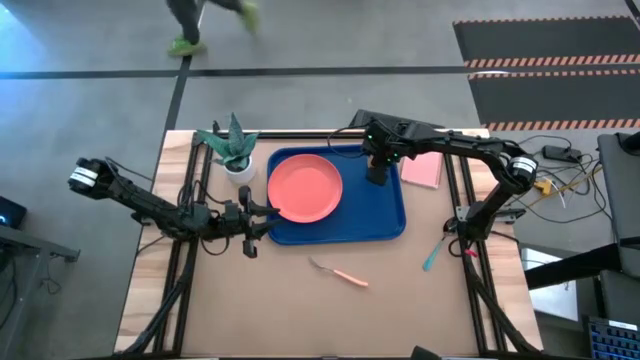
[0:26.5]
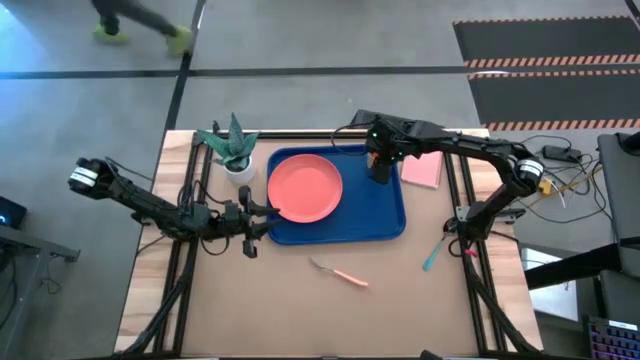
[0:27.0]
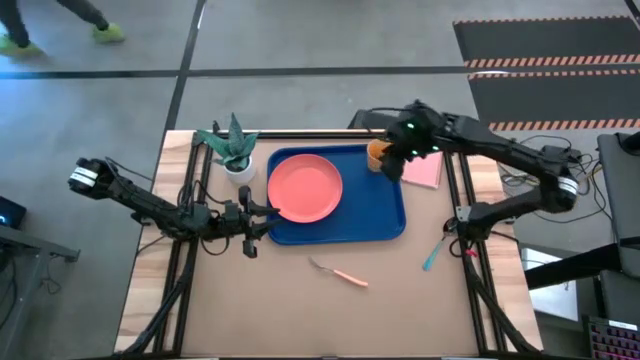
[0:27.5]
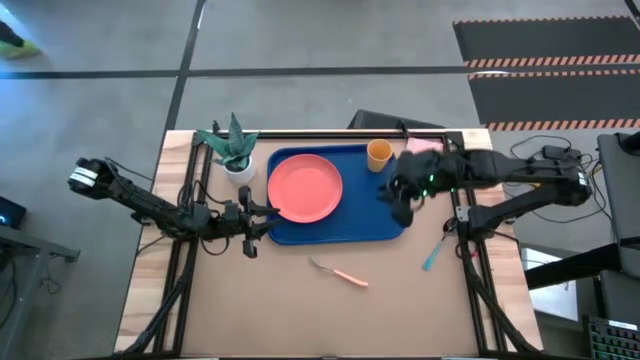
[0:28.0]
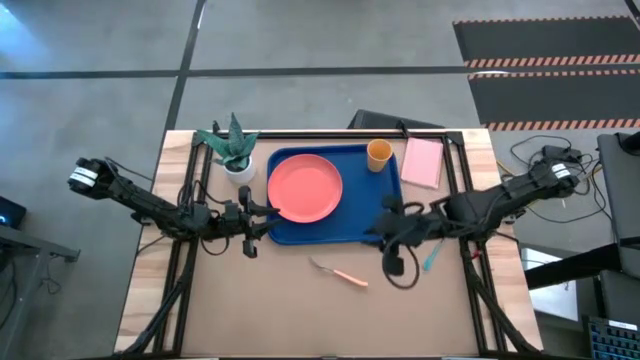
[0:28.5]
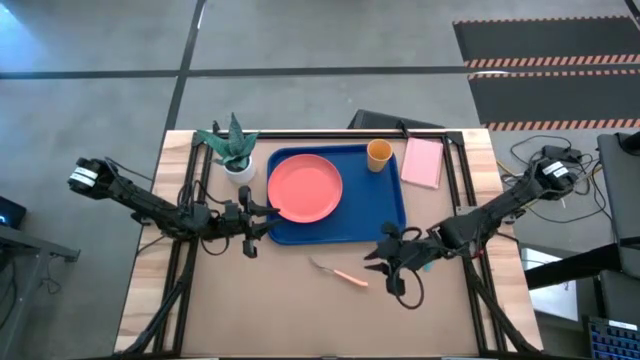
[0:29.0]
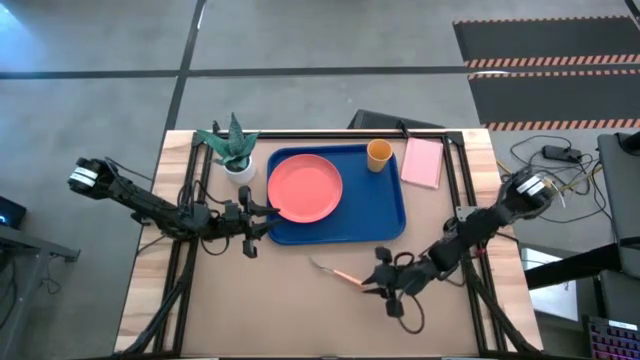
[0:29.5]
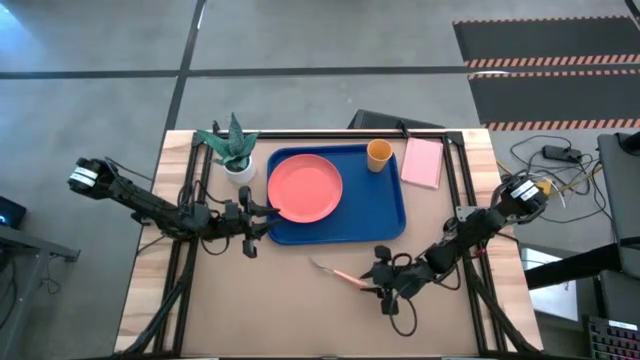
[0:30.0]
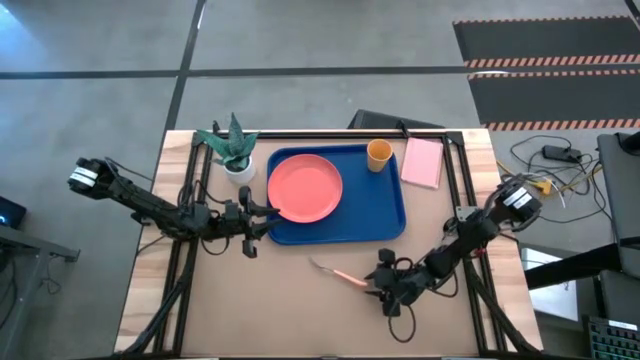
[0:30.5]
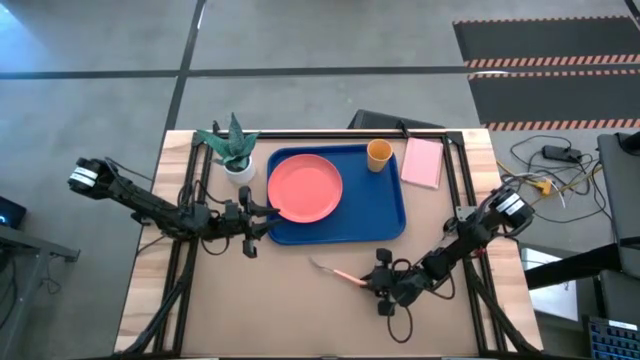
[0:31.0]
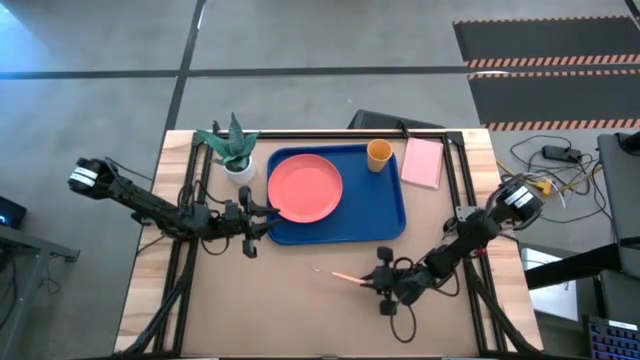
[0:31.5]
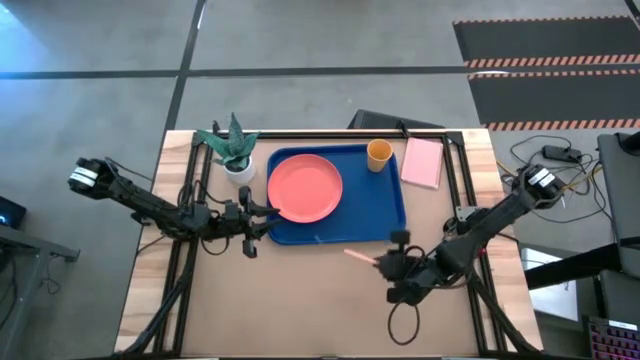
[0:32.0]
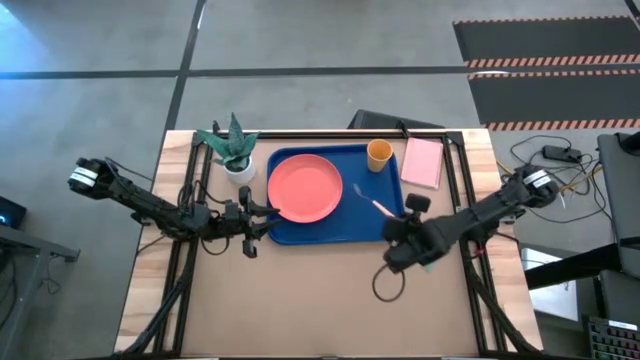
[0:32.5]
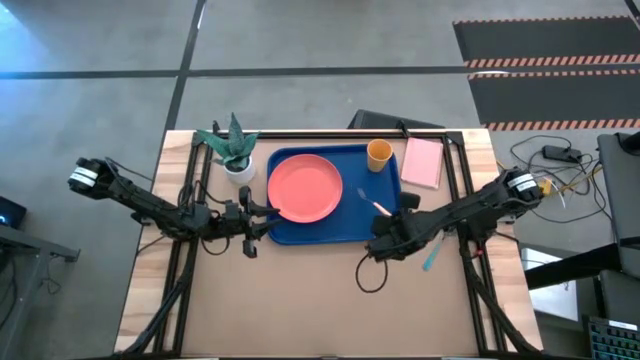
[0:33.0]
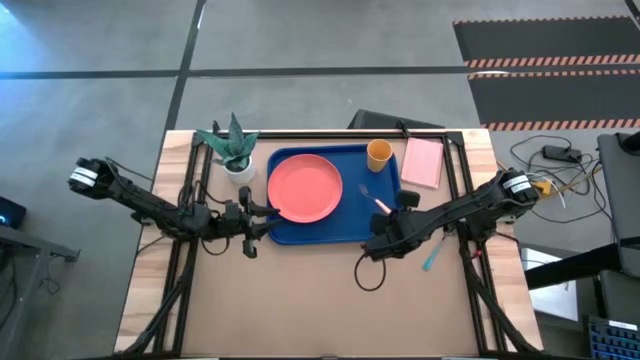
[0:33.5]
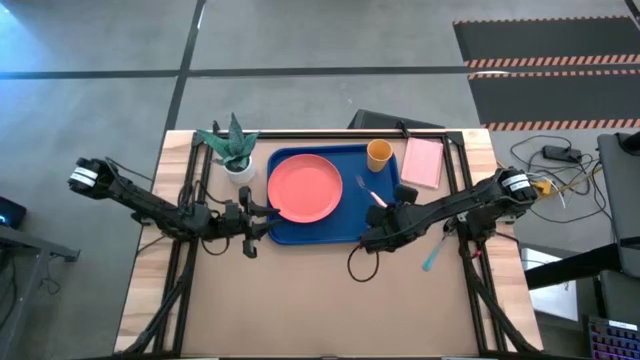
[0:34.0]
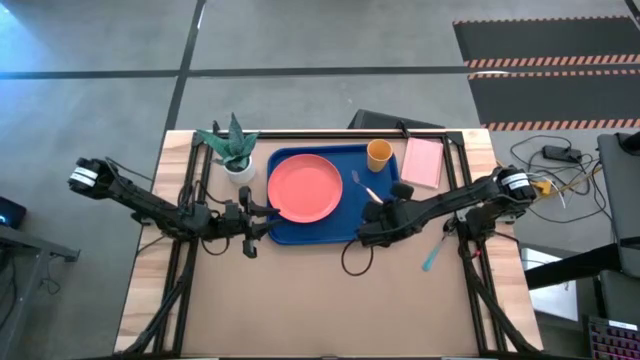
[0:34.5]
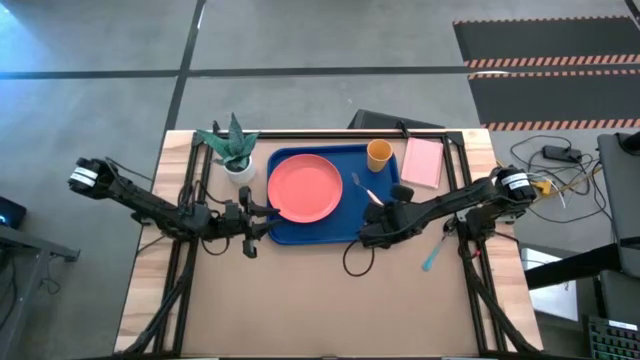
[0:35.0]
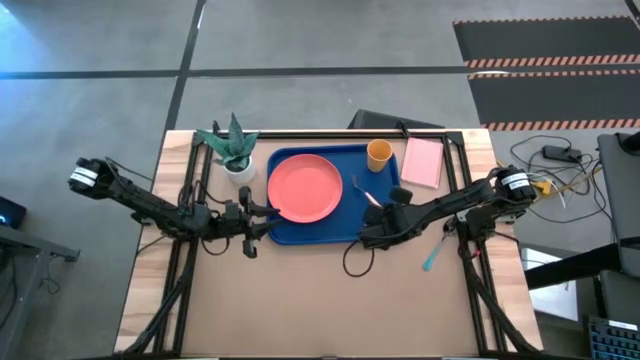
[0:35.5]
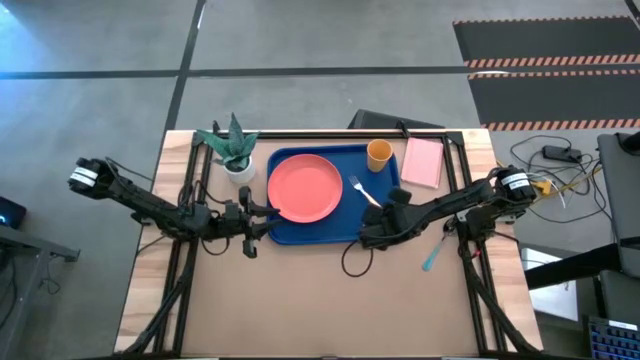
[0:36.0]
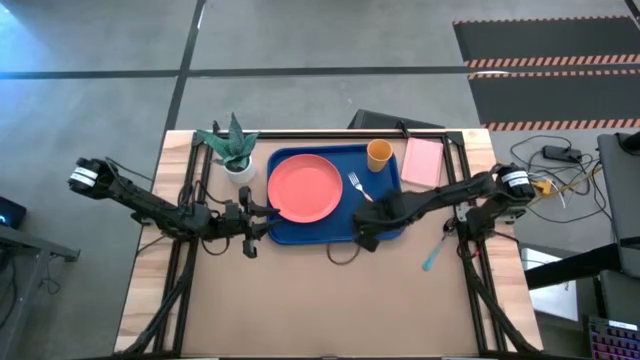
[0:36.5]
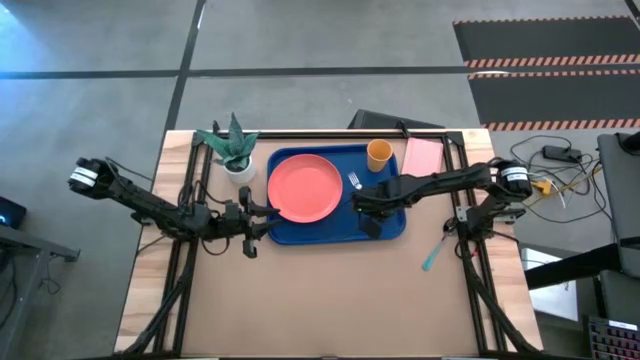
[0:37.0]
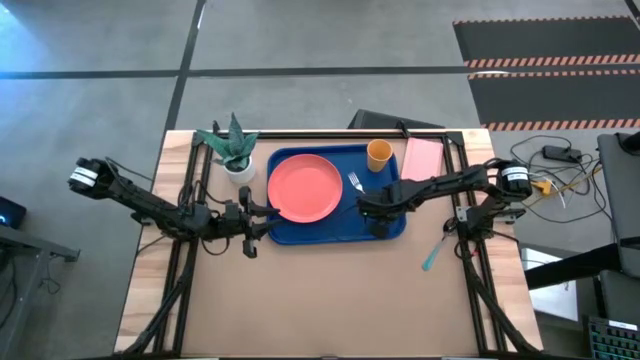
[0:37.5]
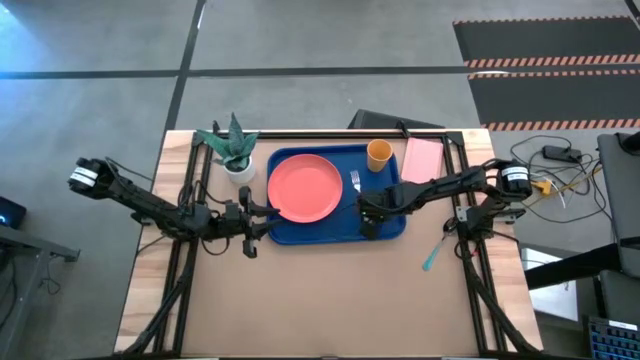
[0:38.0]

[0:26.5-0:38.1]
Task: Pick and place plate/cup/fork/spoon on tray
Put the yellow fork on the blue tray on the right of the orange plate

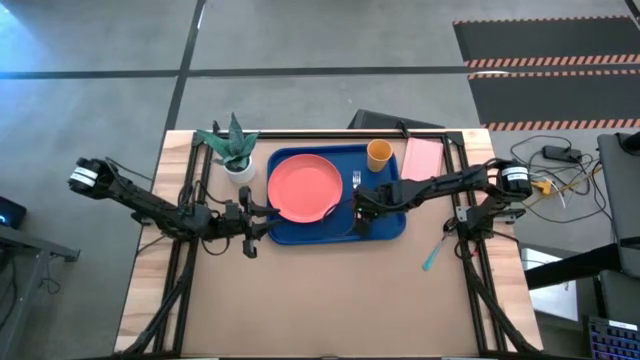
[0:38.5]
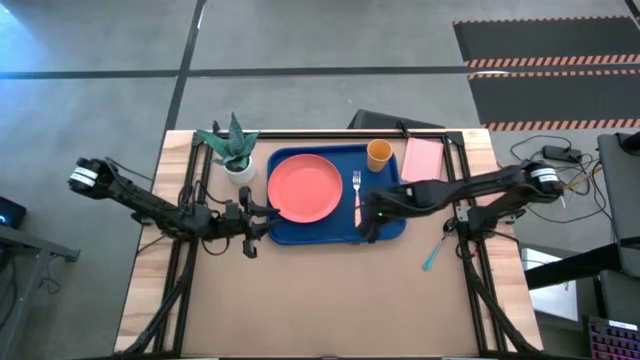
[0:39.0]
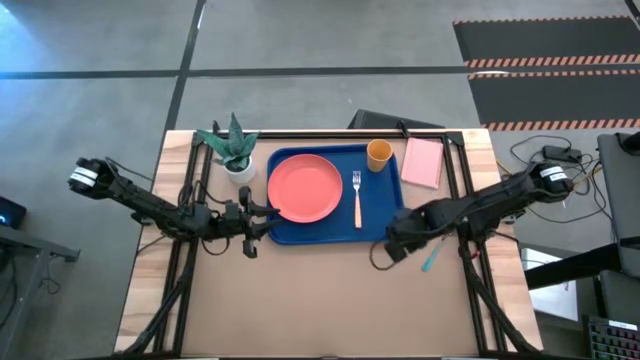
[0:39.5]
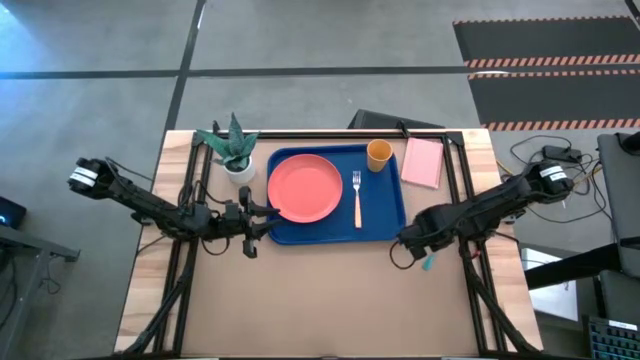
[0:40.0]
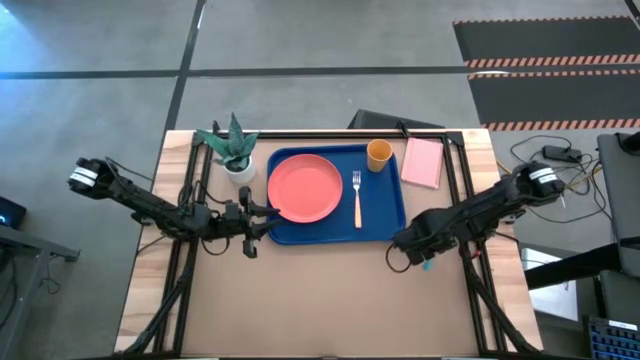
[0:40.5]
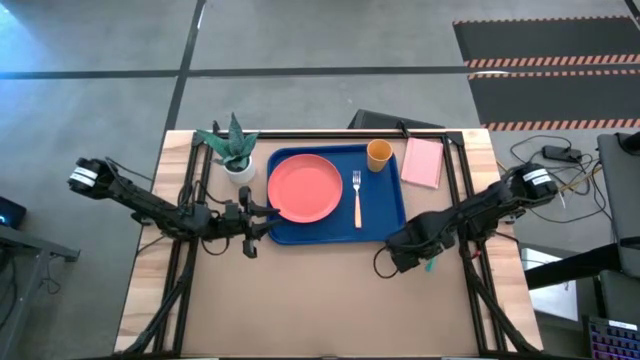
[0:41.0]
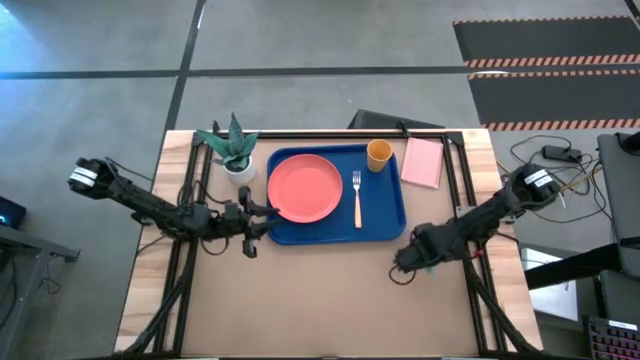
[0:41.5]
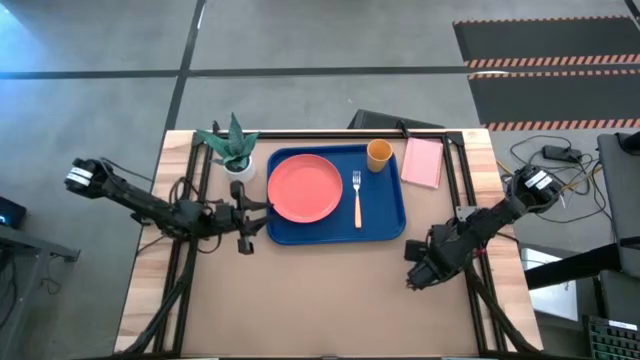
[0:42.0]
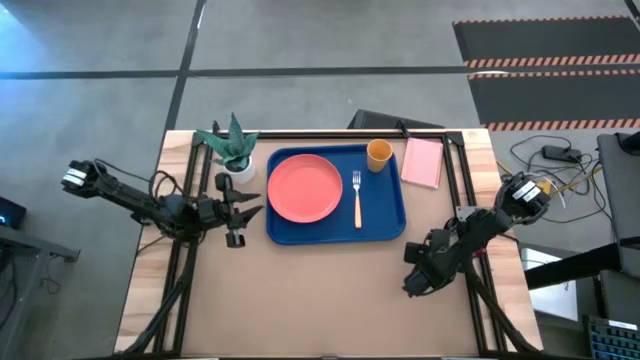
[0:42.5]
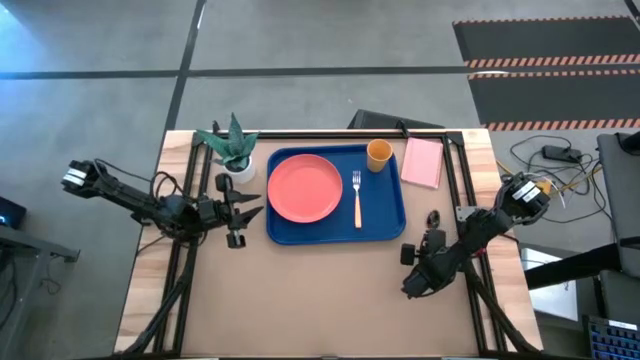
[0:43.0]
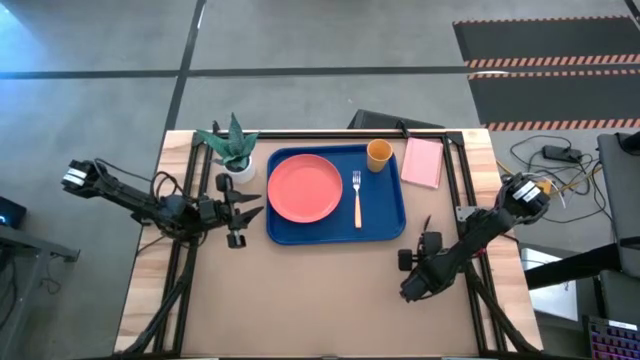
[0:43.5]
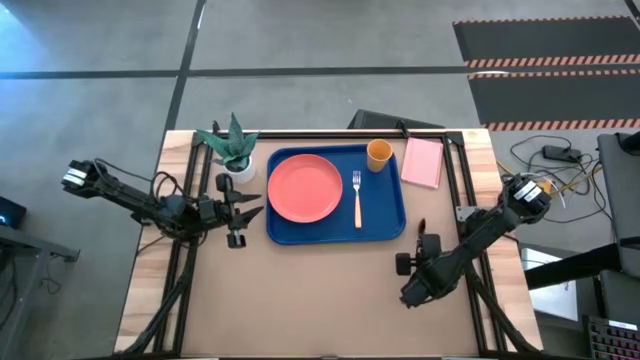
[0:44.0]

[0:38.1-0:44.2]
Put the blue spoon on the blue tray on the right of the yellow fork

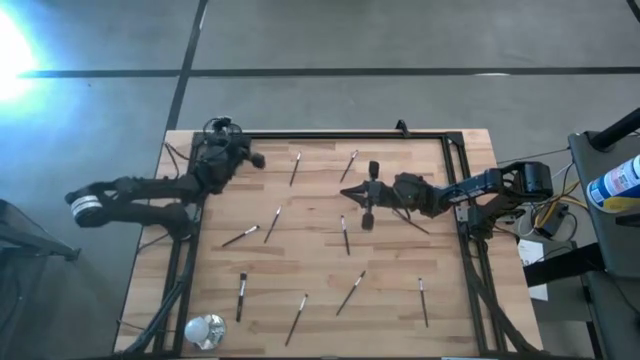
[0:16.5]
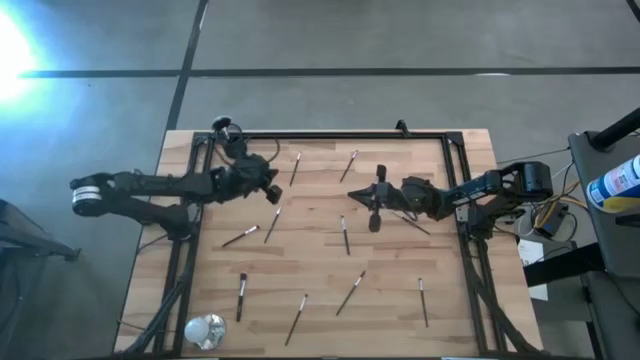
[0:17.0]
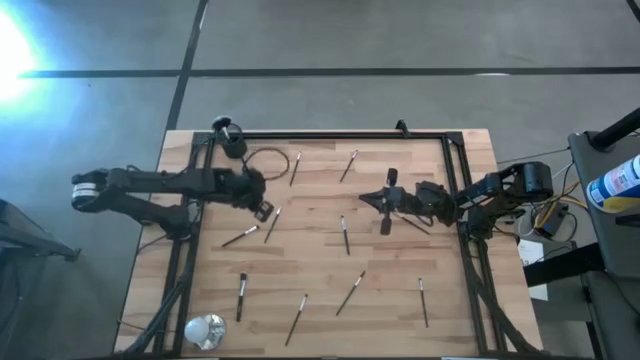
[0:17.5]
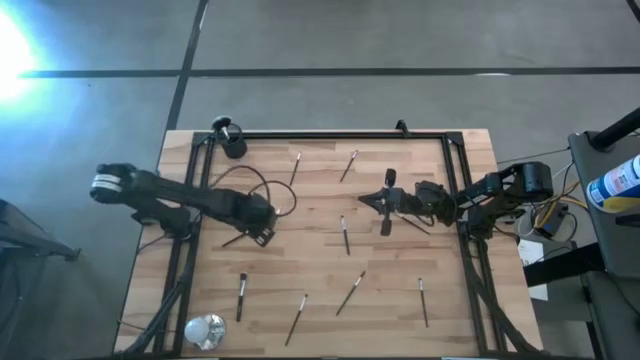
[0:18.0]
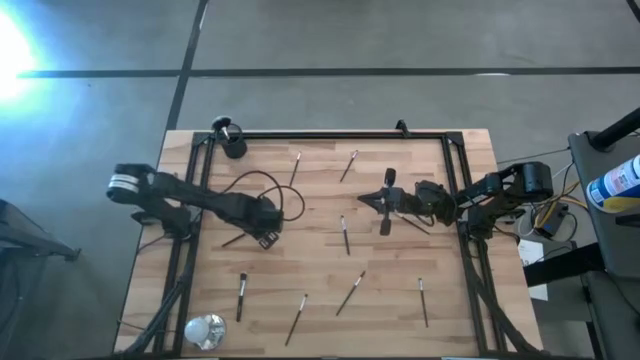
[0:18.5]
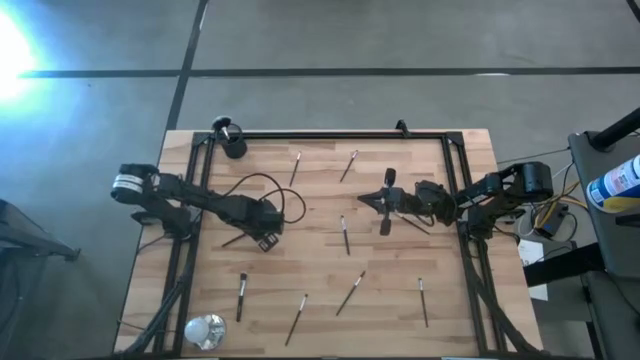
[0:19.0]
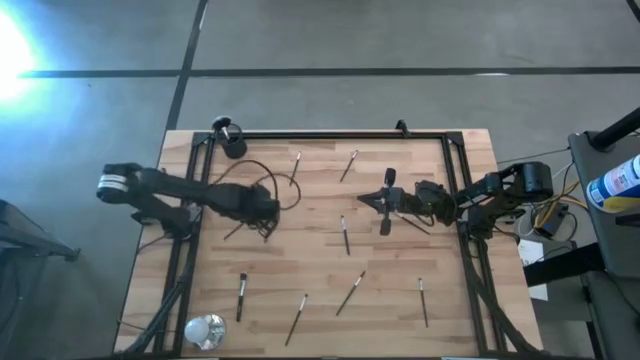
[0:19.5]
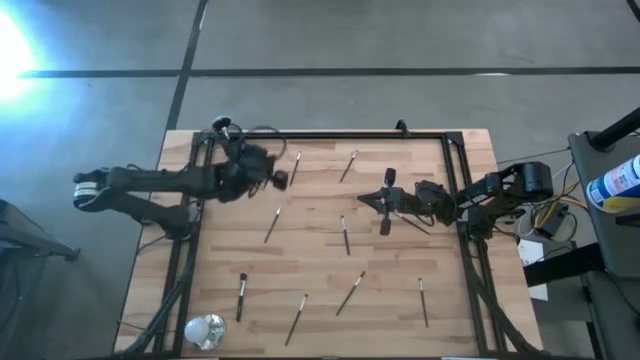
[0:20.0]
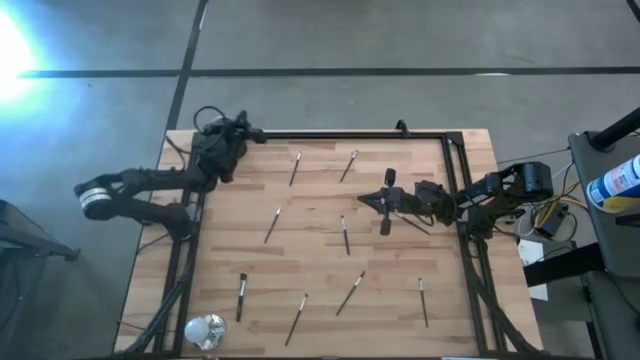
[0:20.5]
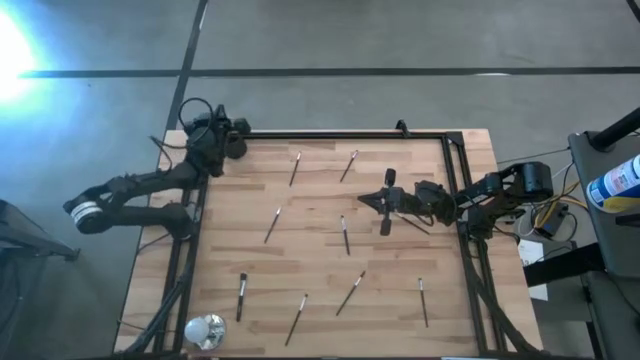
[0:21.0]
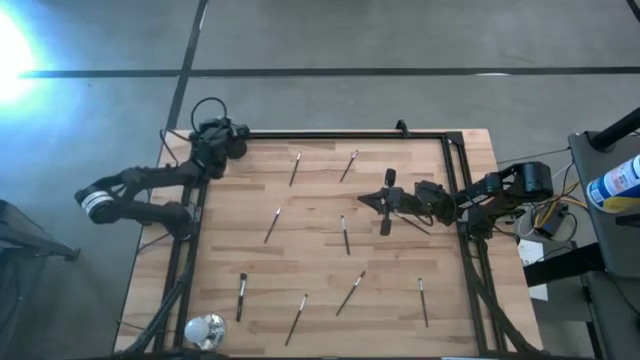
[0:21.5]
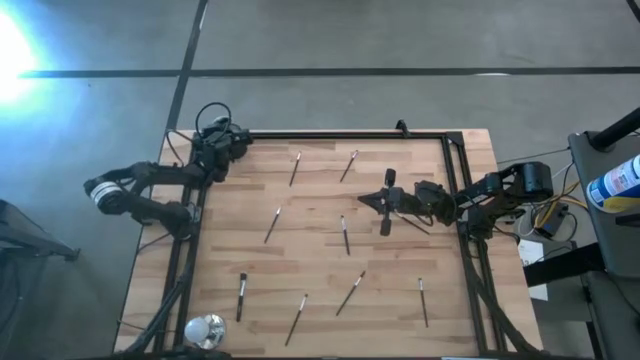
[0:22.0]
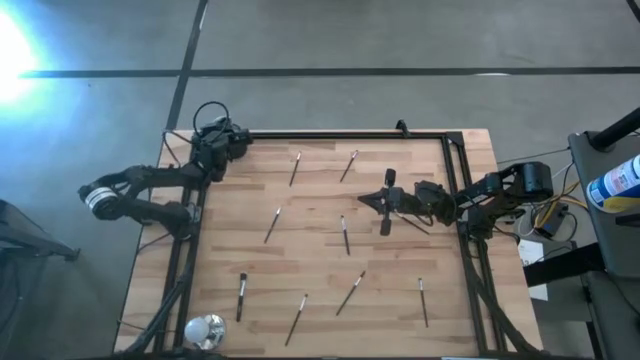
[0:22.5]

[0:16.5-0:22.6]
Task: Put items in baskets/containers
Put the black eyeshadow brush into the black pen holder
